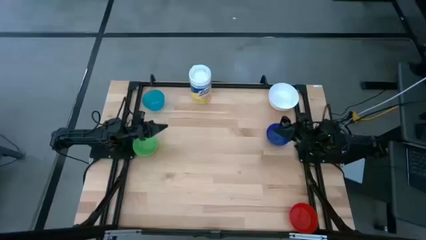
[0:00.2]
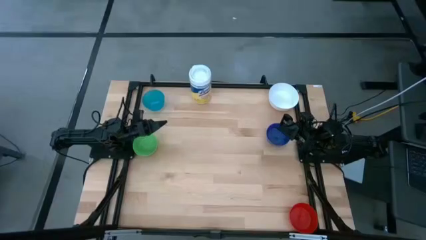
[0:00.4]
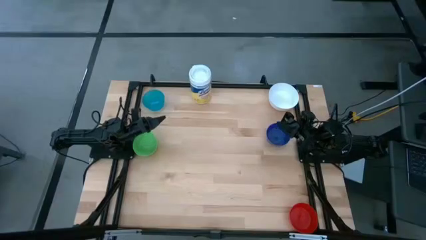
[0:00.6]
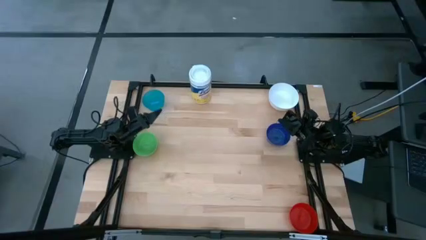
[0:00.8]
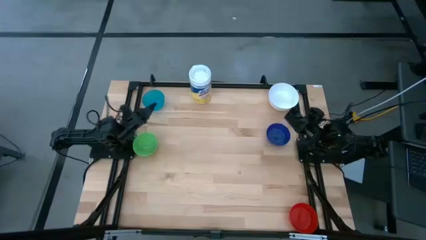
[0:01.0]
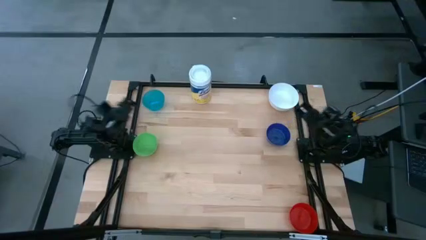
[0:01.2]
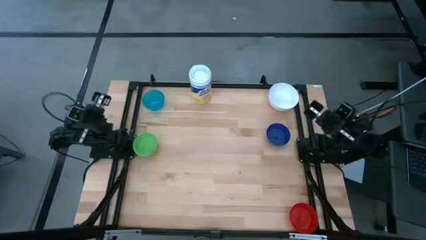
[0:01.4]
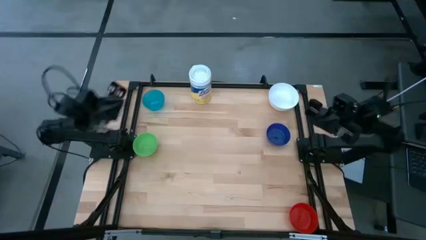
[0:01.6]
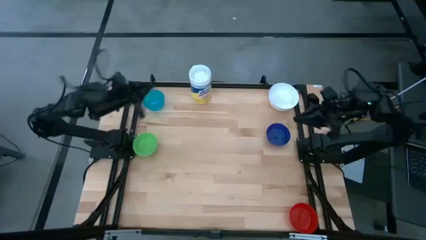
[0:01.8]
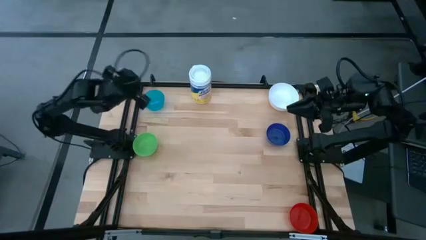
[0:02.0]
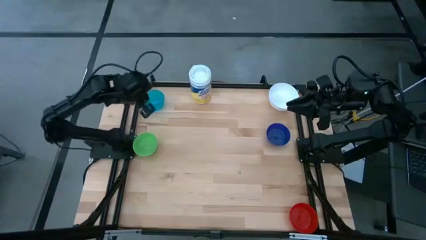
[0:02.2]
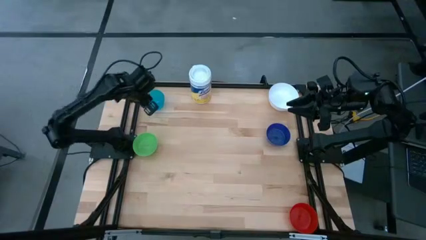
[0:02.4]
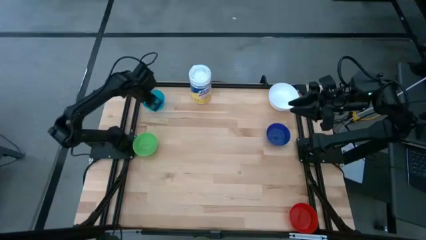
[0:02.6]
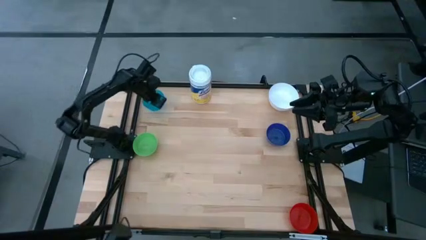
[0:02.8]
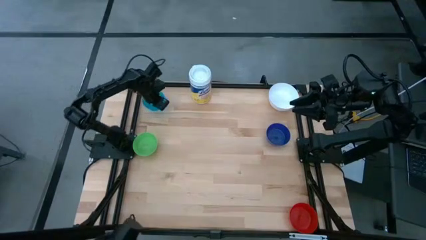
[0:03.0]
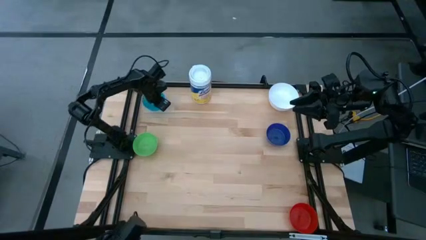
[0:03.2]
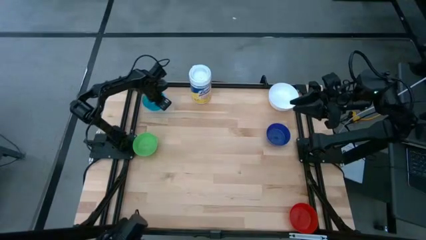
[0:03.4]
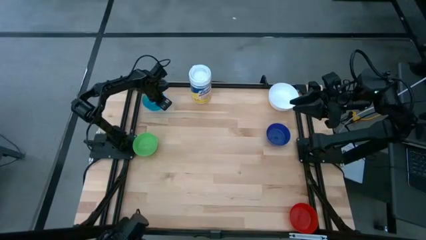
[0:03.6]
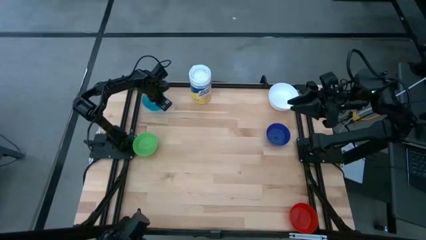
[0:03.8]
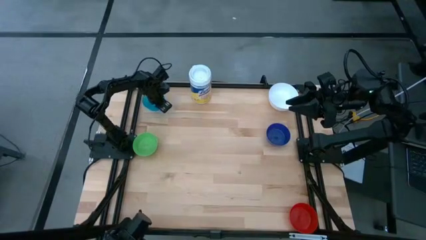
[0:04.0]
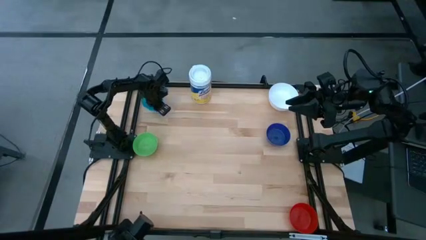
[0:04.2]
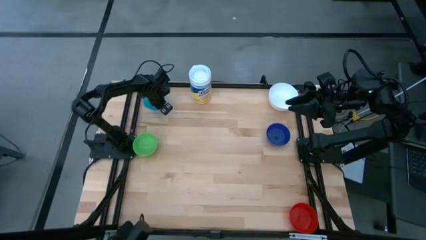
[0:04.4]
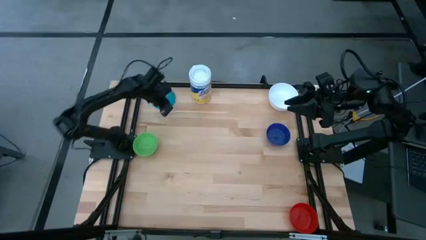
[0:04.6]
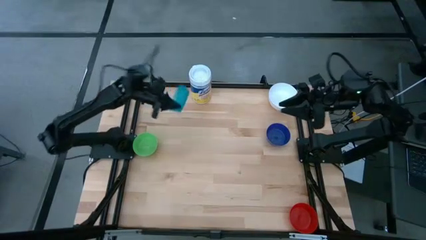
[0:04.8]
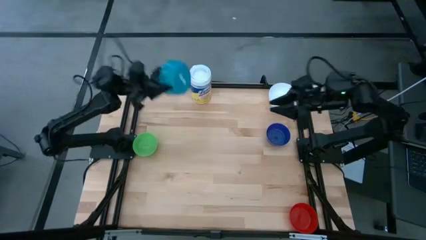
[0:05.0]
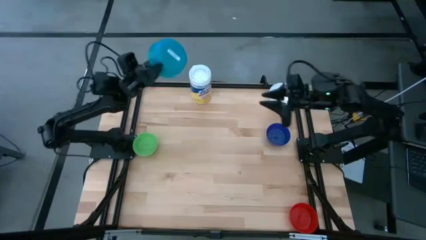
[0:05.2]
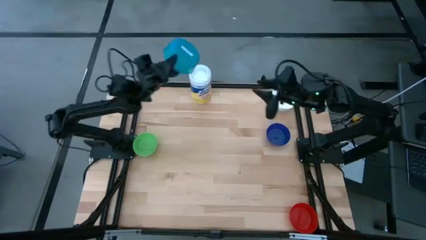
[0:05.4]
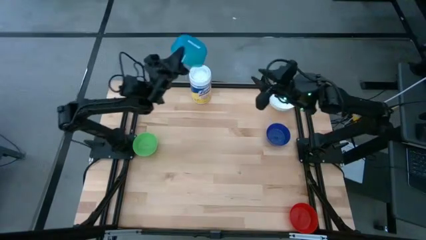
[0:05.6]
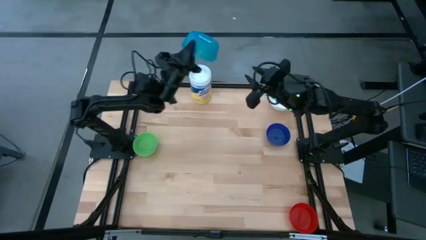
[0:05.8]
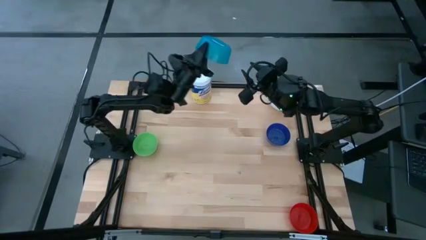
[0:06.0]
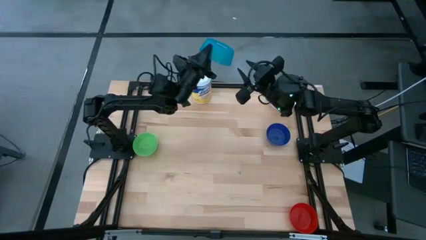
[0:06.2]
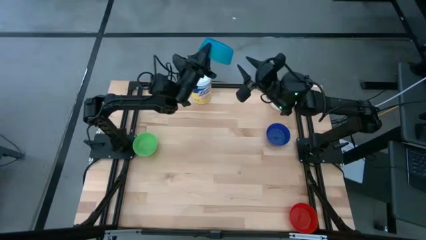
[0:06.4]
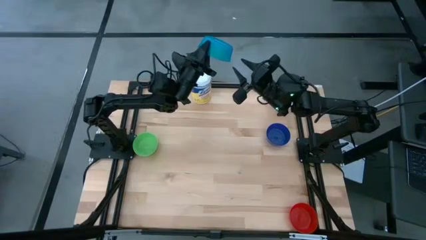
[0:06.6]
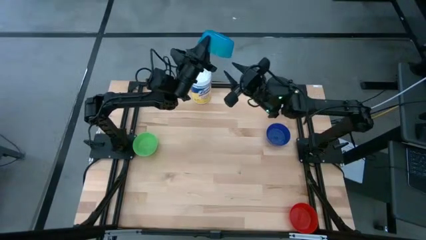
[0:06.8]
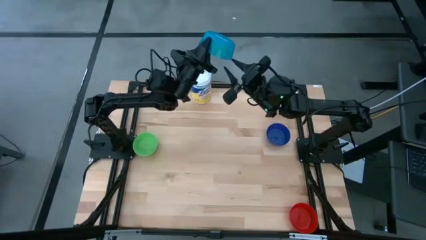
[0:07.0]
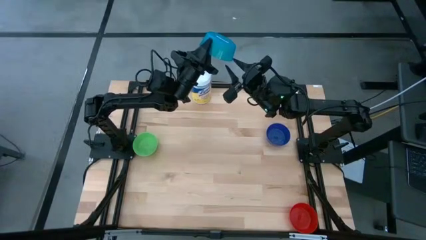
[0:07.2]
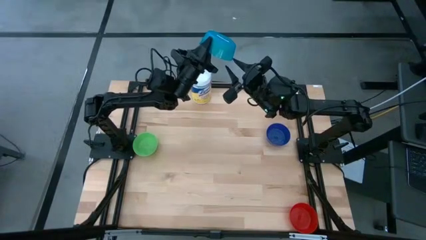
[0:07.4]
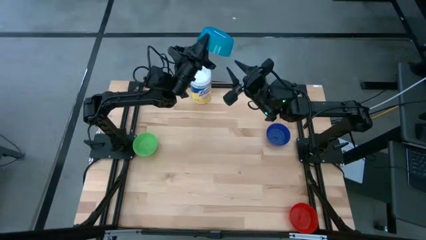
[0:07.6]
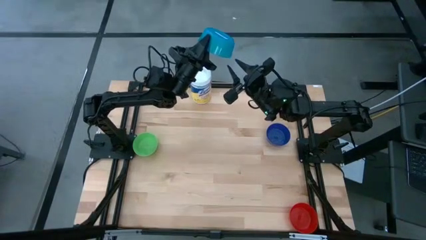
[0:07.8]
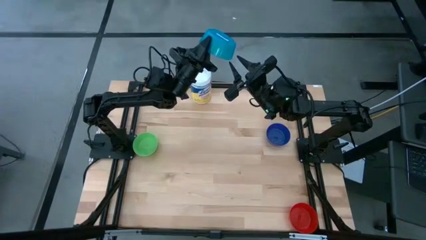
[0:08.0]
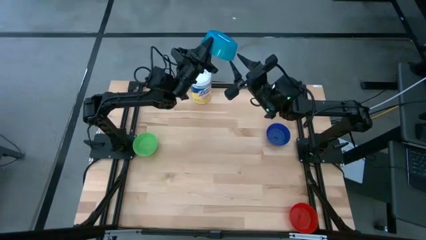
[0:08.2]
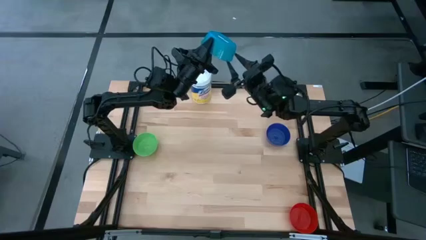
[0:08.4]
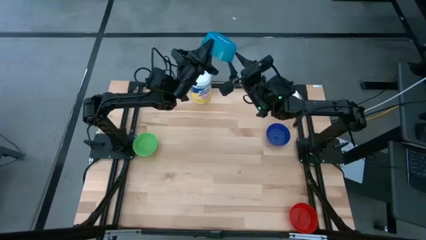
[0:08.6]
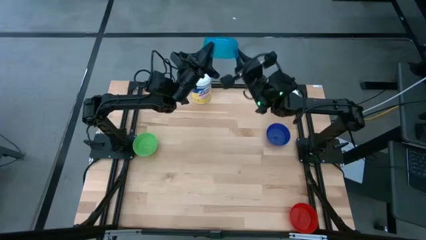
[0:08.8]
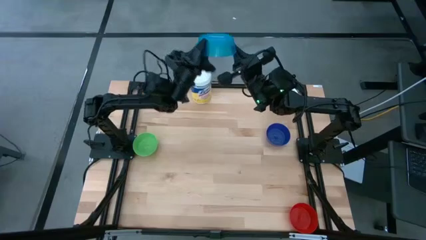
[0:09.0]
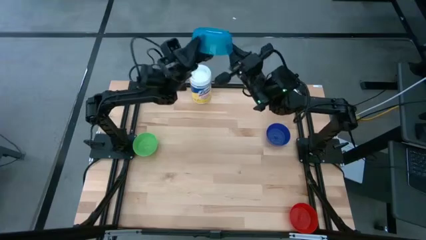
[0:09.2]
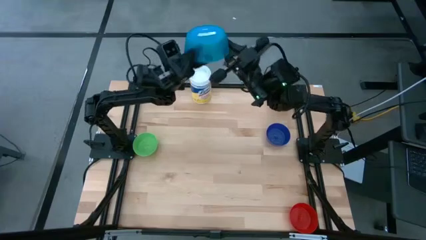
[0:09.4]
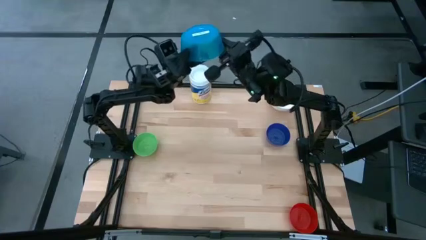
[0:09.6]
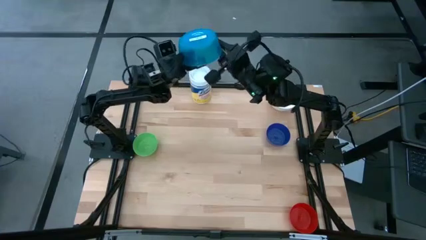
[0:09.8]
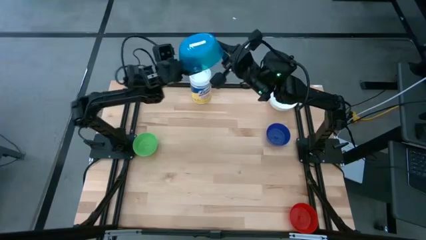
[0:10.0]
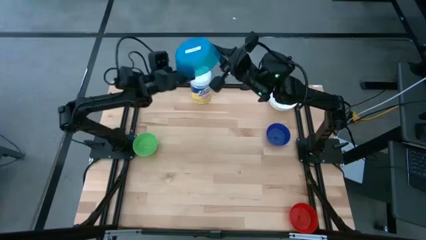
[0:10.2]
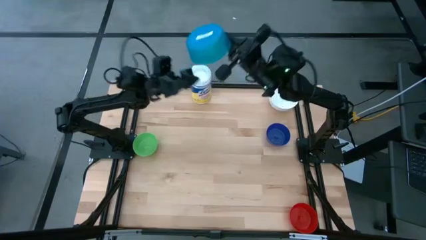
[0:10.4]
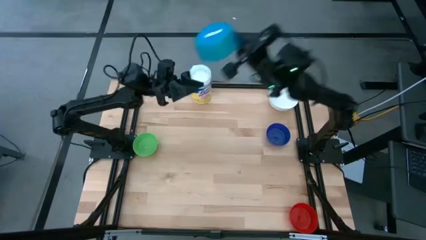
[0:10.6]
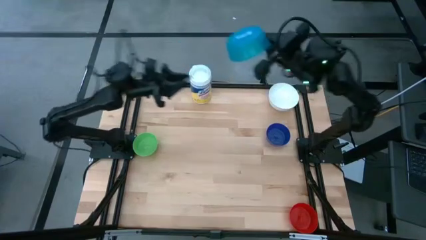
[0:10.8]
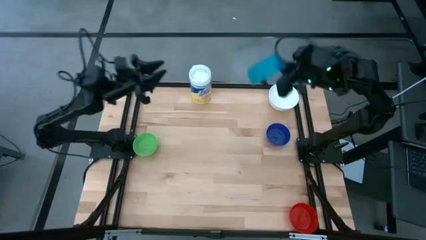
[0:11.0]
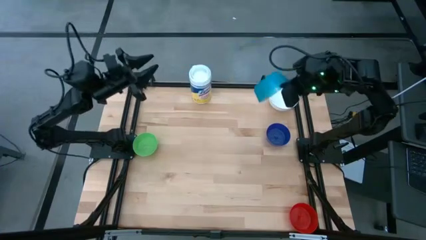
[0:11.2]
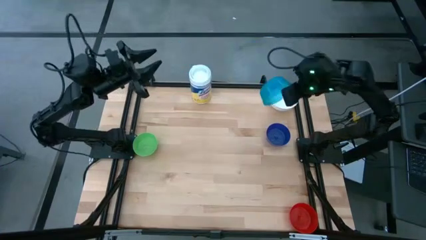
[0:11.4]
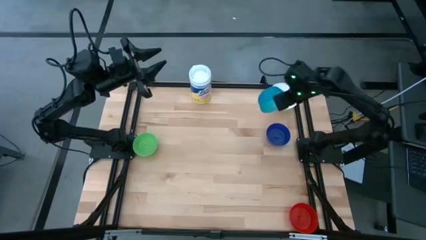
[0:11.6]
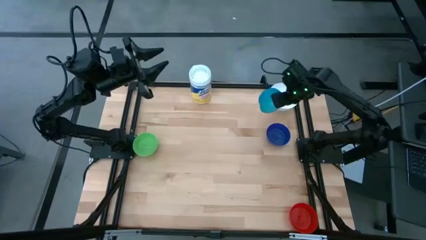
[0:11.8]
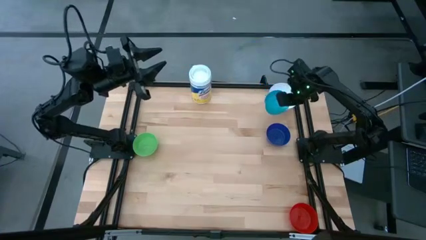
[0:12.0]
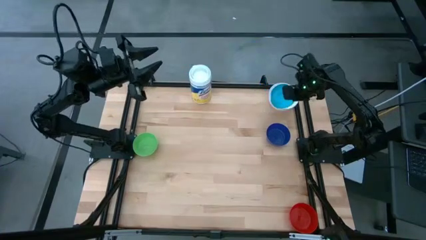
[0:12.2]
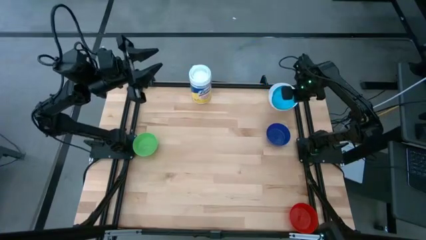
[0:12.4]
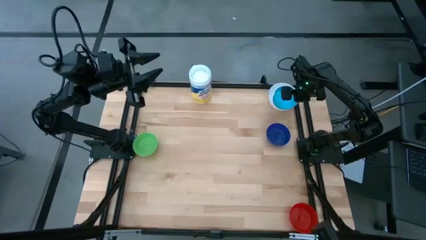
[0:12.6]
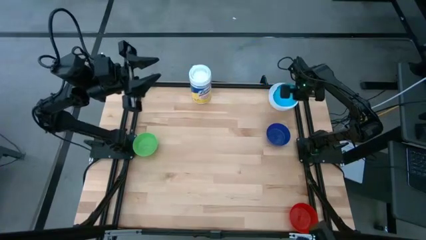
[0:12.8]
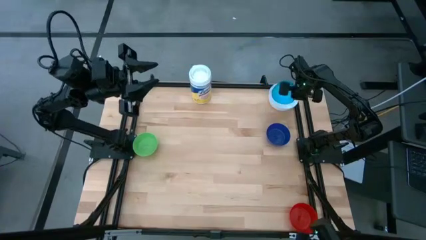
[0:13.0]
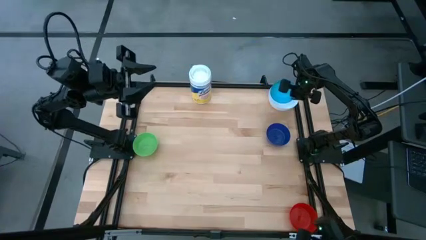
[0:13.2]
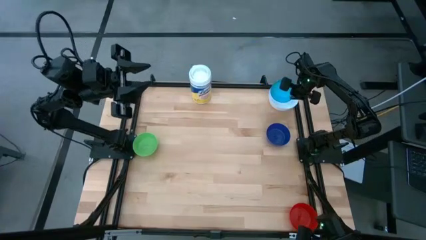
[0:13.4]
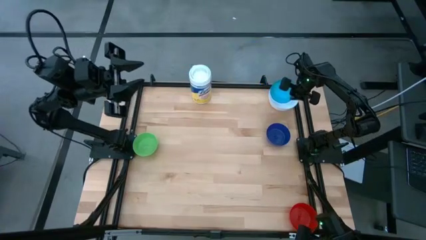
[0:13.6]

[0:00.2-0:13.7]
Stack the light blue bowl on the white bowl
